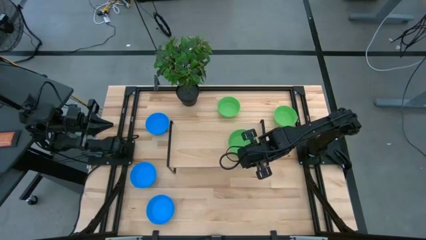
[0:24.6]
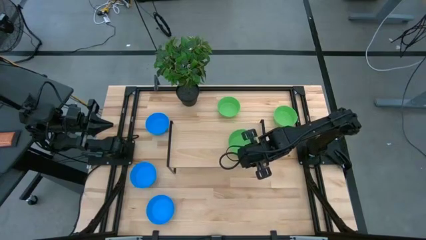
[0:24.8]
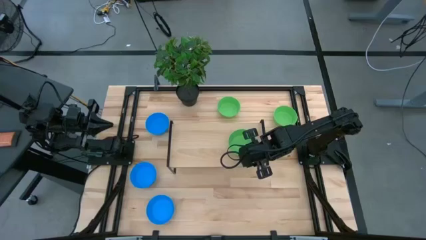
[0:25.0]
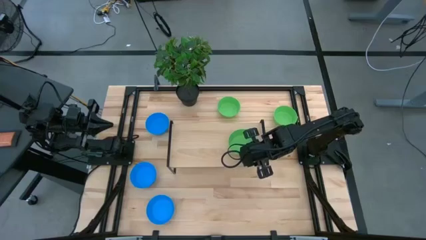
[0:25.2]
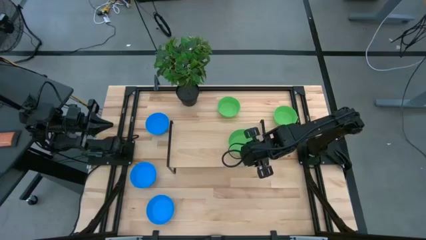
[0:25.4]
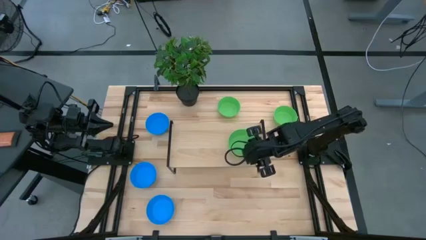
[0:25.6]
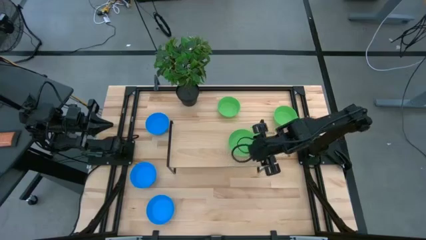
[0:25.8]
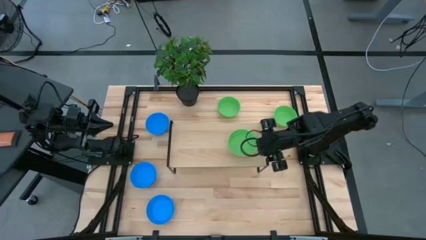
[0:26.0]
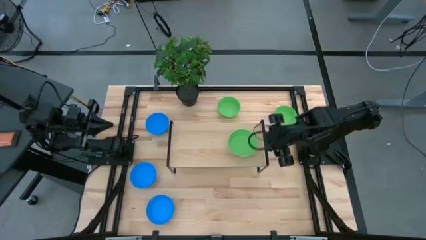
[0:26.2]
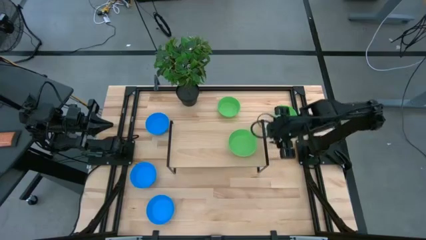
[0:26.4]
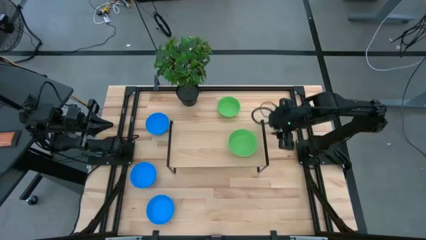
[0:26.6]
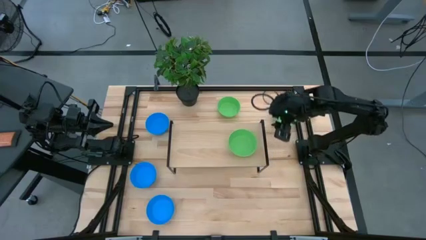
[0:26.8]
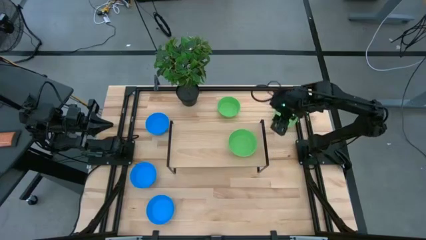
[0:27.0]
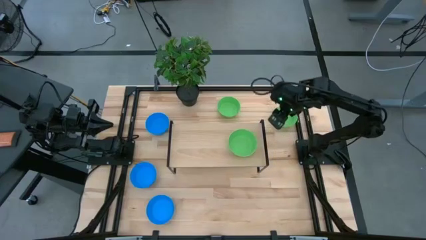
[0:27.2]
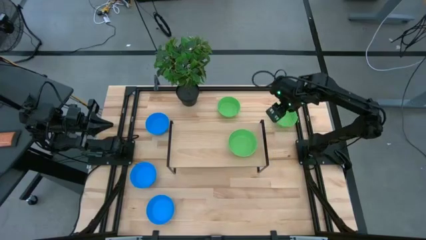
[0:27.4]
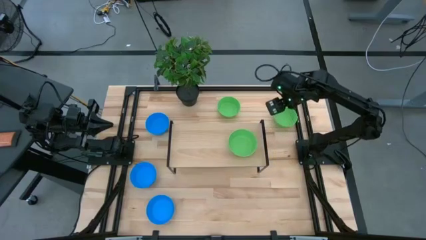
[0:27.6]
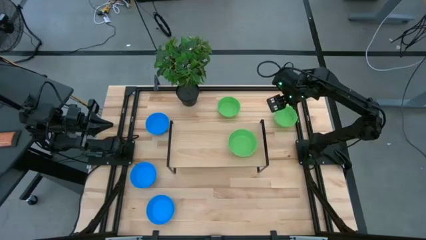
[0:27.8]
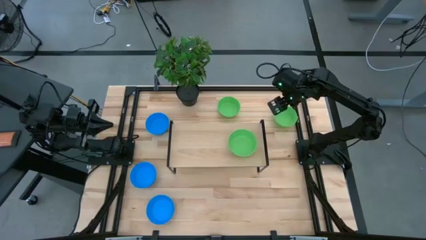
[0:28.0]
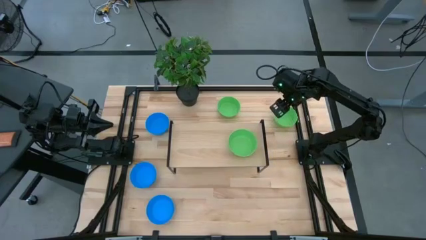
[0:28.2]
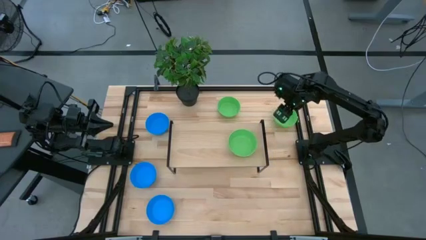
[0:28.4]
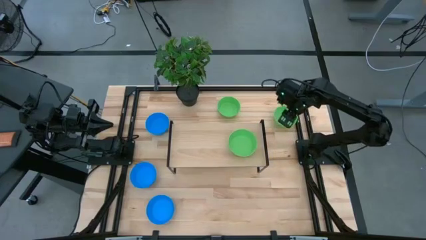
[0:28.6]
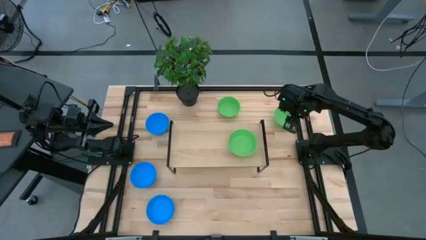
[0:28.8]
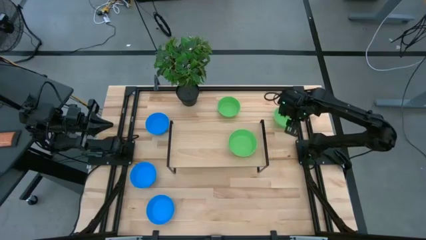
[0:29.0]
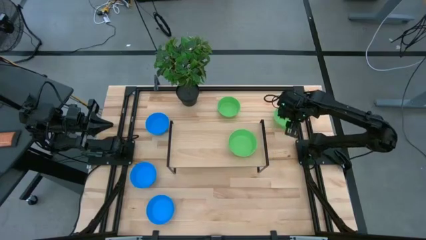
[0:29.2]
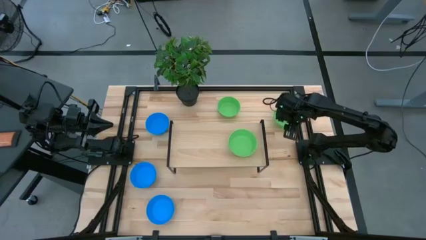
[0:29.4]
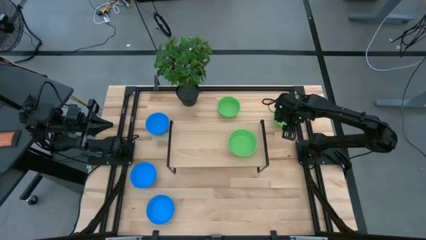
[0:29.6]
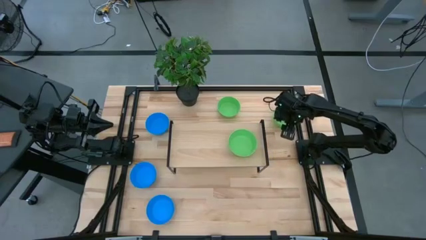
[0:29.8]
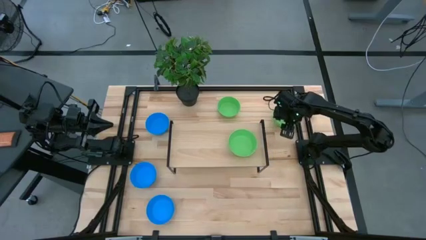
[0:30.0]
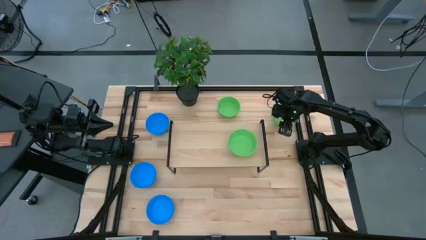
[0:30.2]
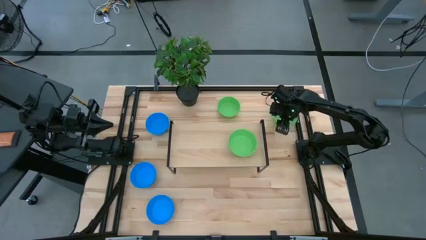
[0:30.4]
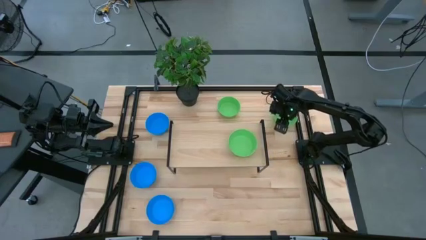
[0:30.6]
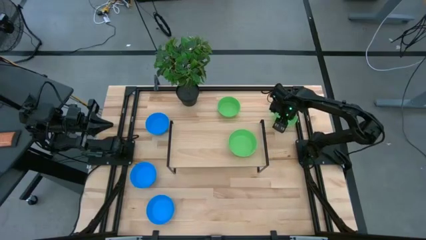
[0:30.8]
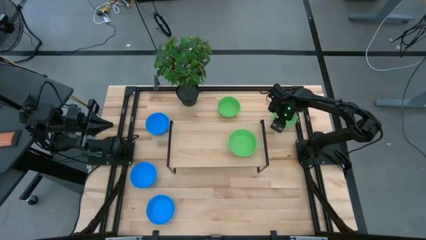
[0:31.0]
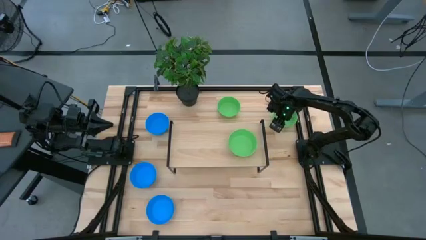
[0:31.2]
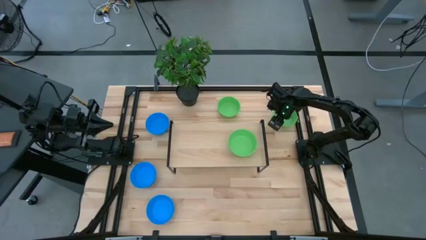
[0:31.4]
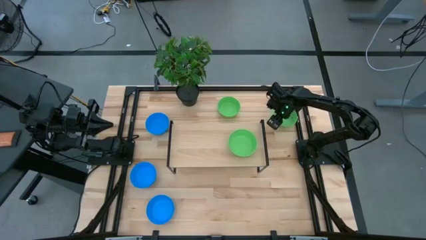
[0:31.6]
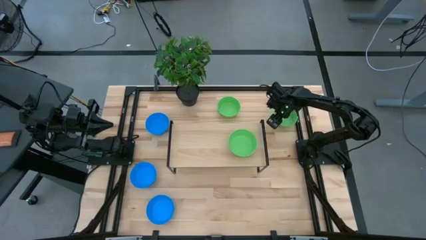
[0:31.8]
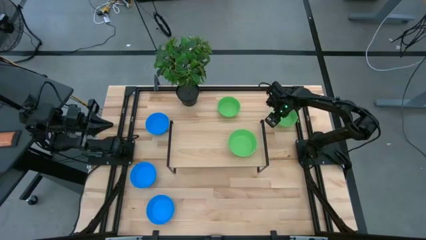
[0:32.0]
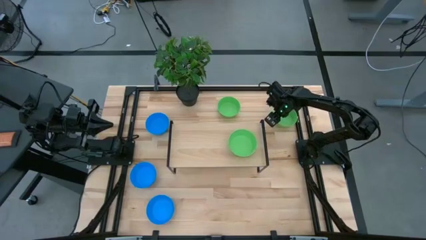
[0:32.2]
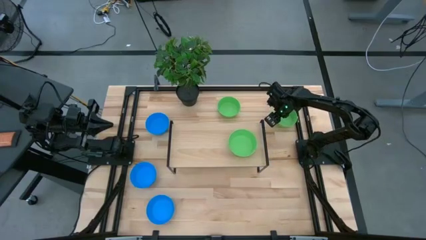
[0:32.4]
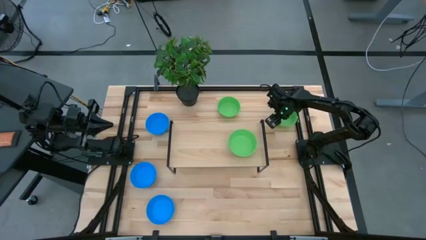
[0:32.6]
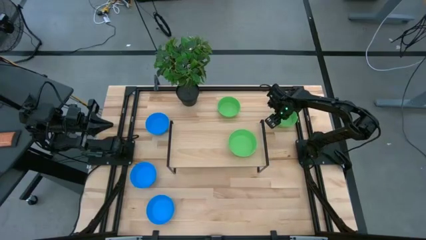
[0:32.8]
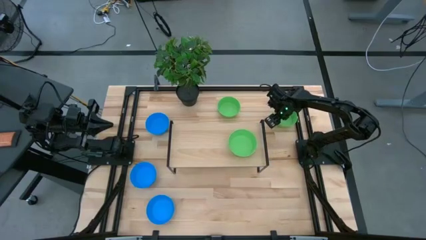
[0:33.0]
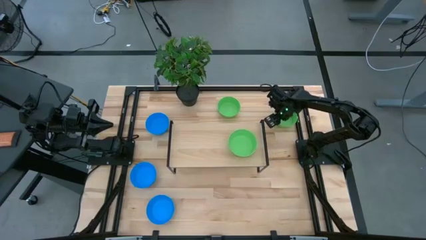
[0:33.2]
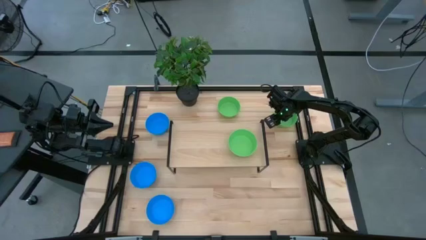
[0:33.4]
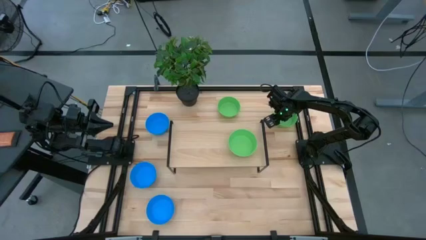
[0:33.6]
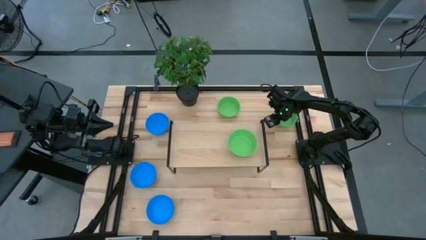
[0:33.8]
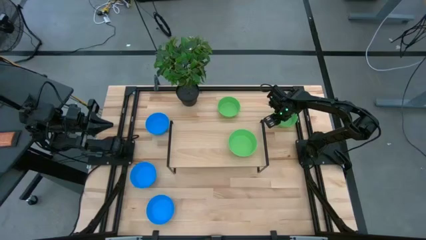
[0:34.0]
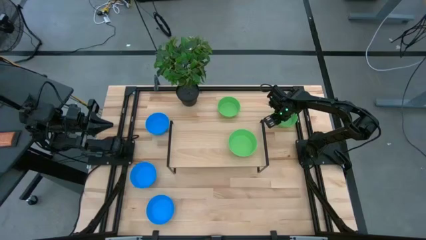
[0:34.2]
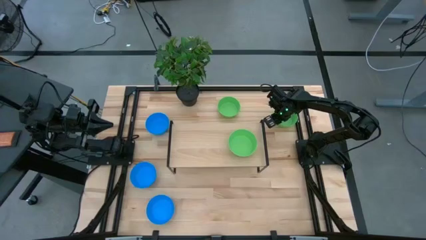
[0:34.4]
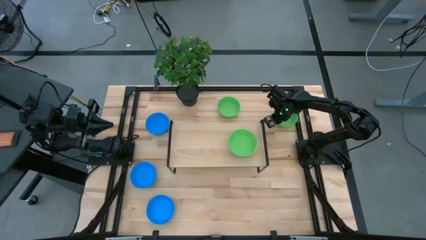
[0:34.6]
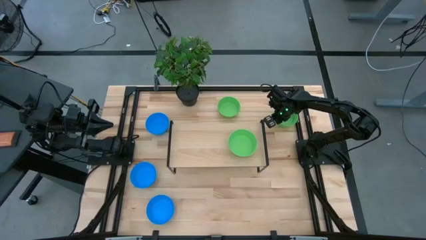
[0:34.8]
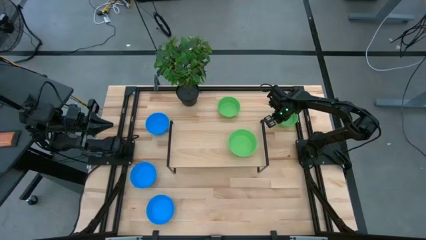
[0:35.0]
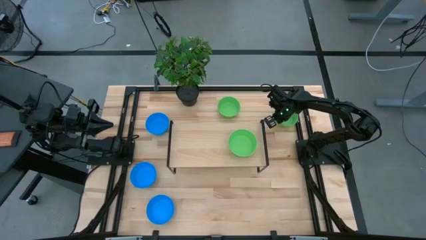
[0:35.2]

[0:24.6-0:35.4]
Task: Pick & Place Mini bowls
Stack the right green bowl on the green bowl on the shelf
